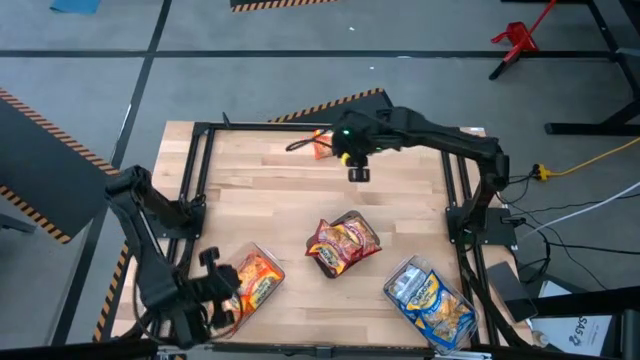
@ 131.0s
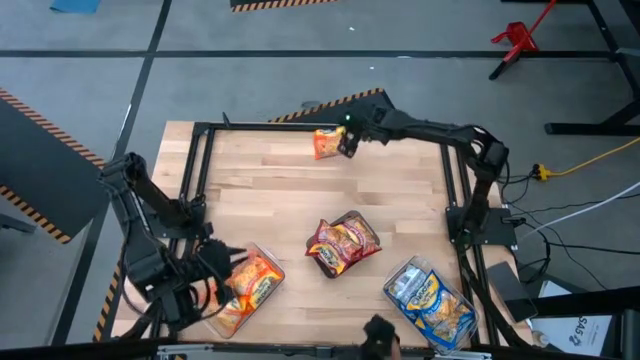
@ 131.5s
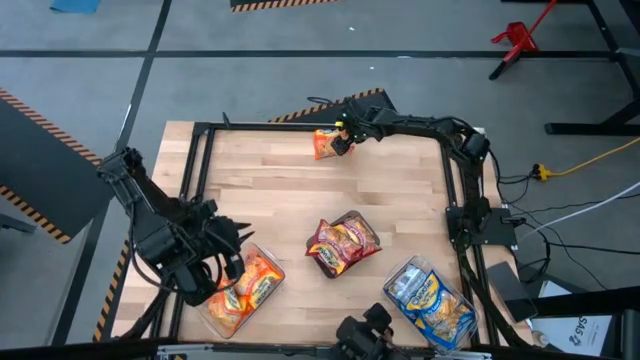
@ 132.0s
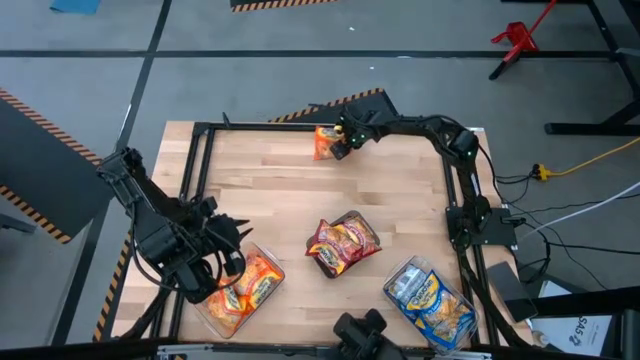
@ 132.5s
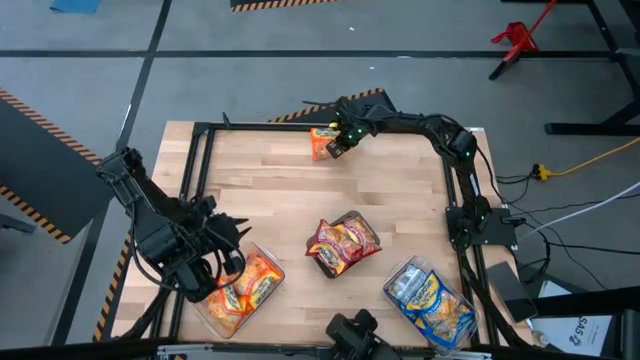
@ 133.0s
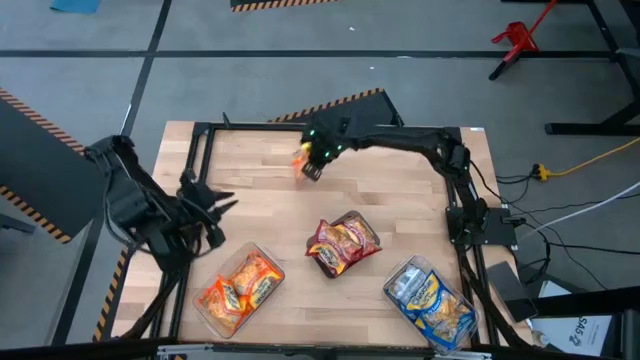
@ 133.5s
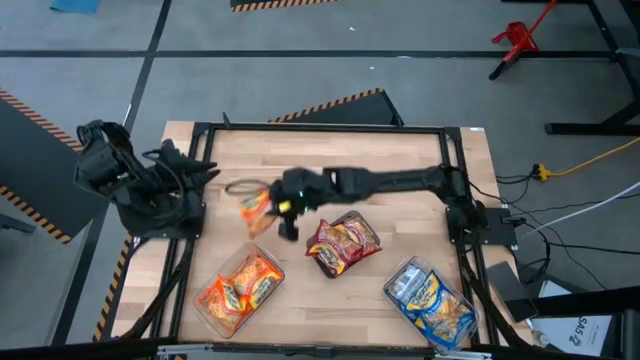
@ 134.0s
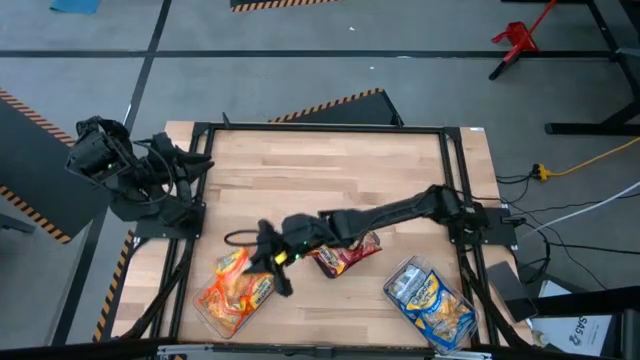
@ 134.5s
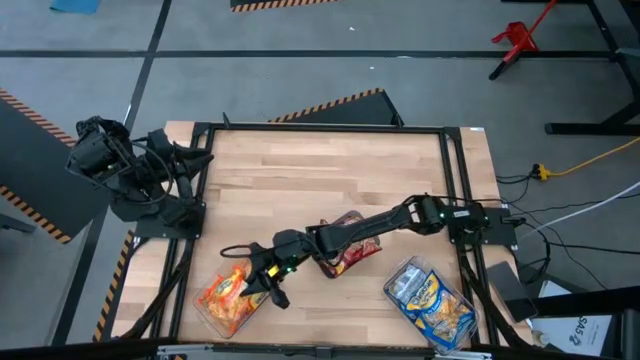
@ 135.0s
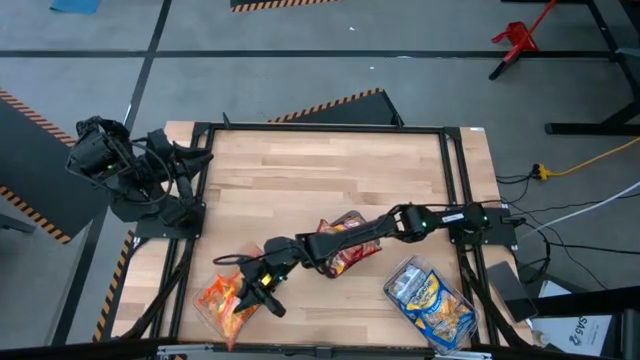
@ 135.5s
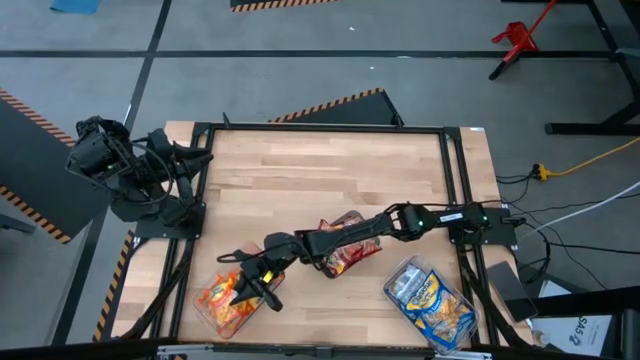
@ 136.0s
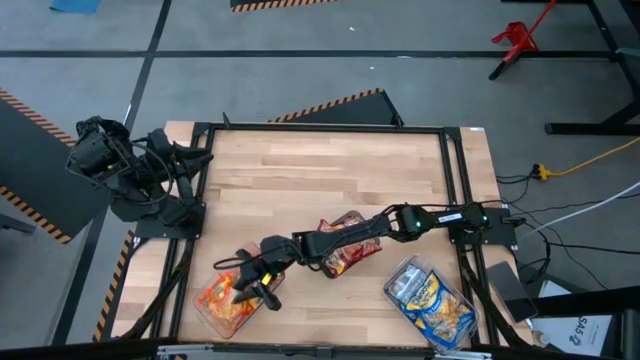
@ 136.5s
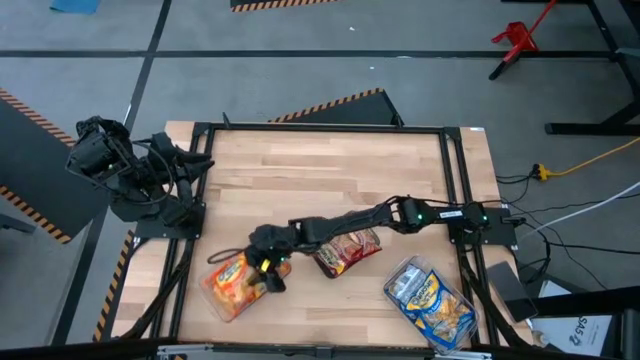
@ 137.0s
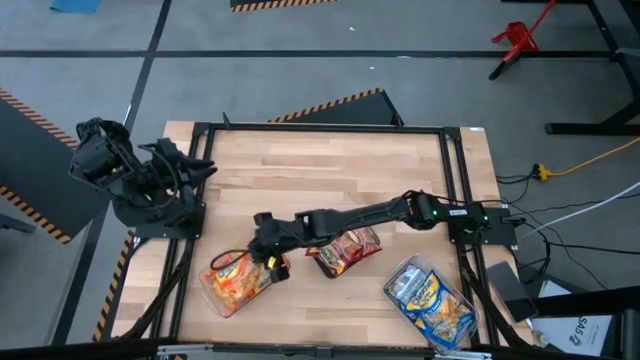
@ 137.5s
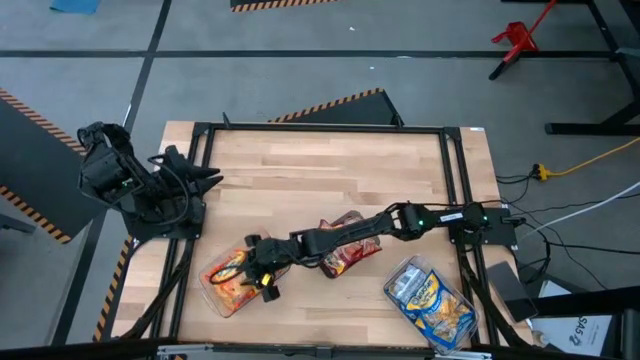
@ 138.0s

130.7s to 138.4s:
Task: Sort Maruchan noodles
Put the orange noodle pack into the left transparent bin

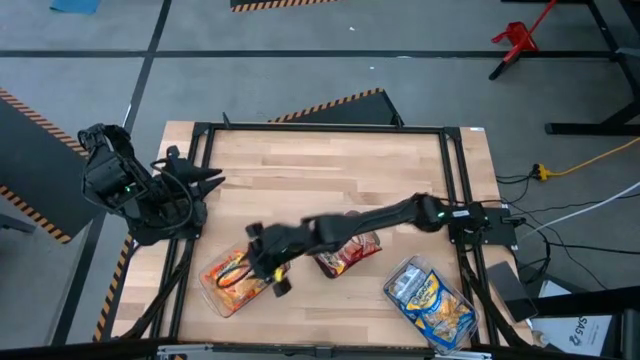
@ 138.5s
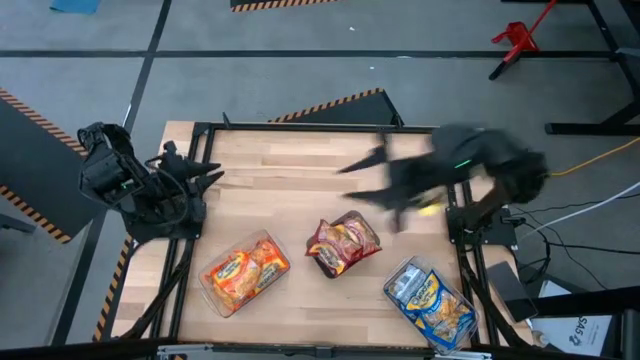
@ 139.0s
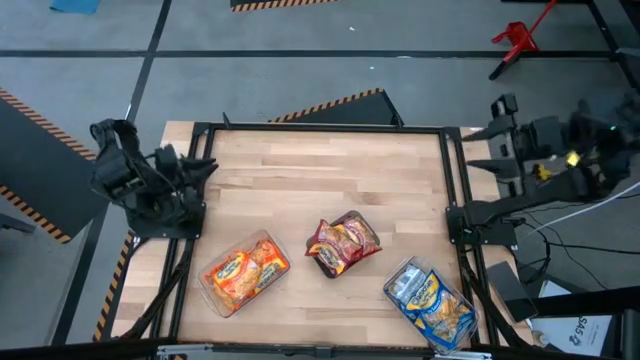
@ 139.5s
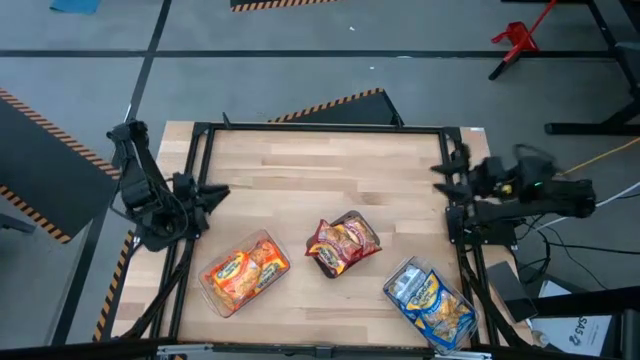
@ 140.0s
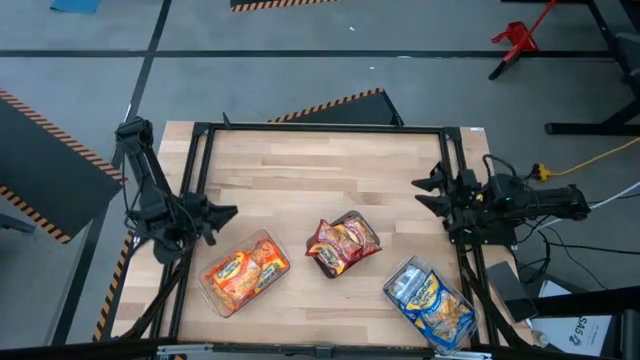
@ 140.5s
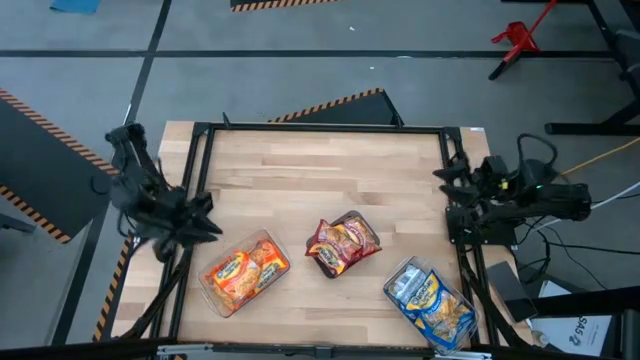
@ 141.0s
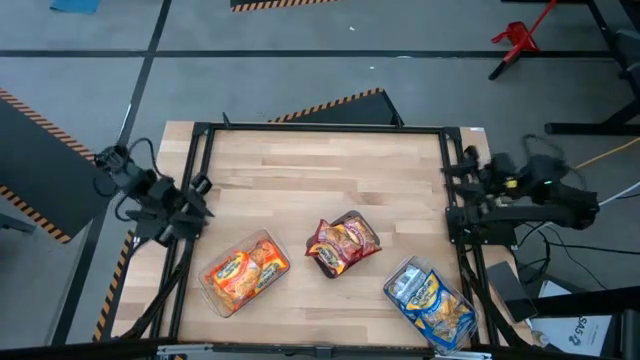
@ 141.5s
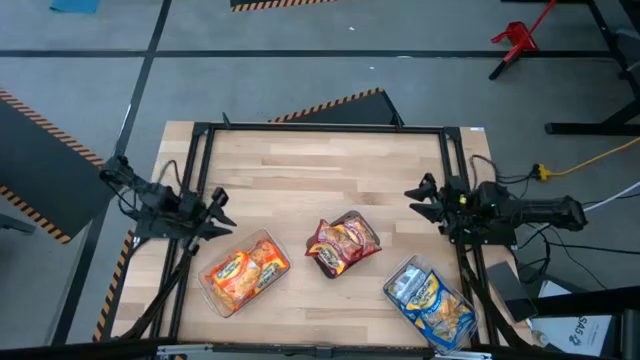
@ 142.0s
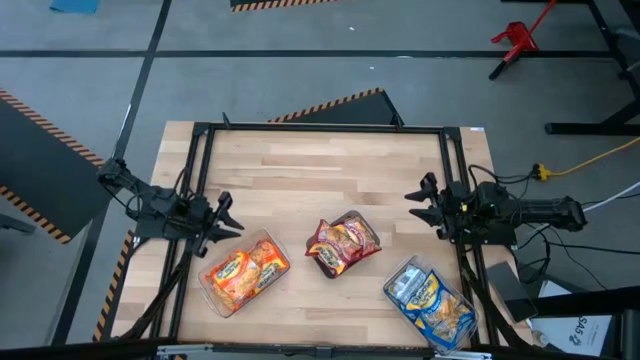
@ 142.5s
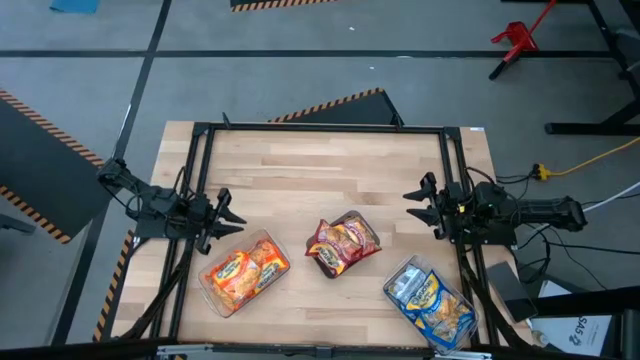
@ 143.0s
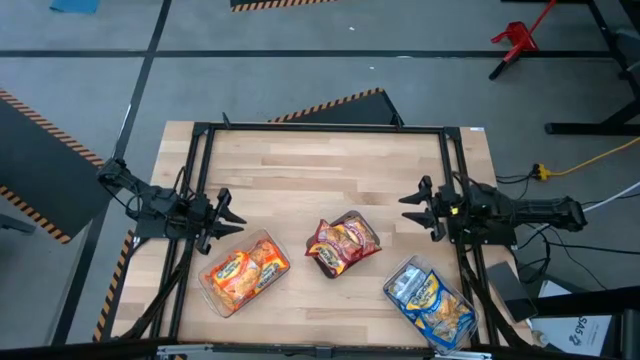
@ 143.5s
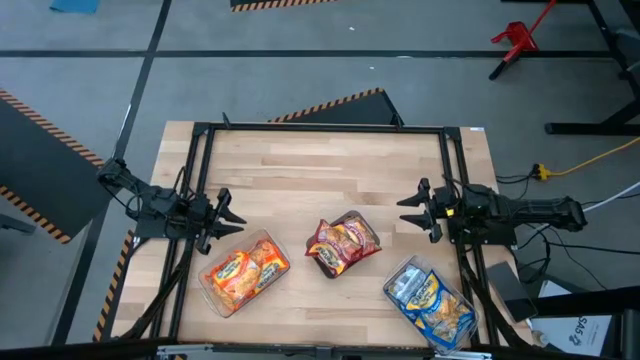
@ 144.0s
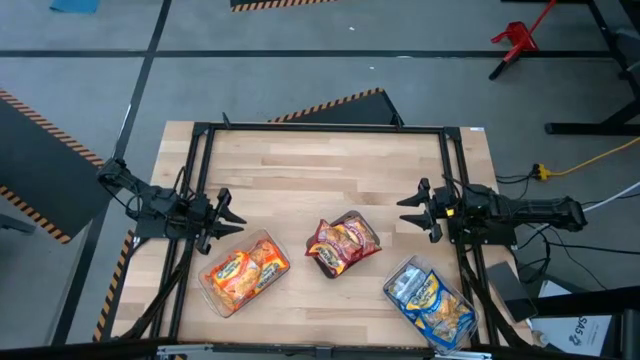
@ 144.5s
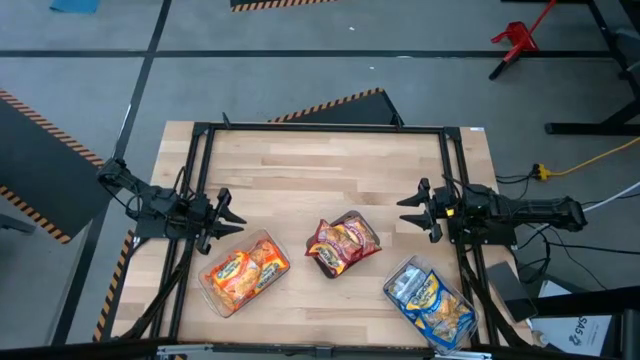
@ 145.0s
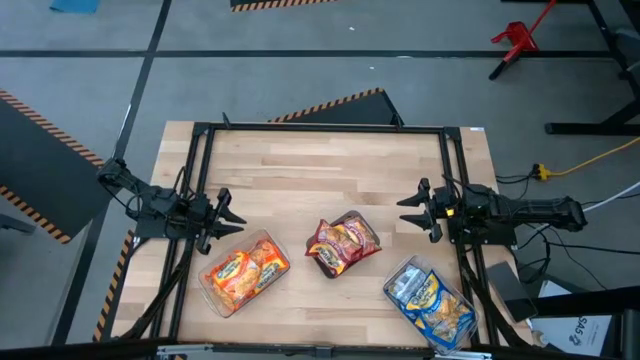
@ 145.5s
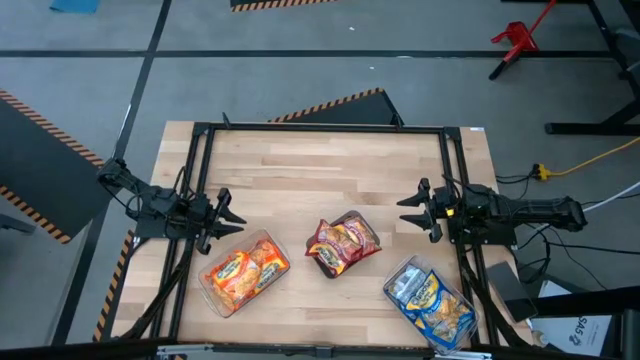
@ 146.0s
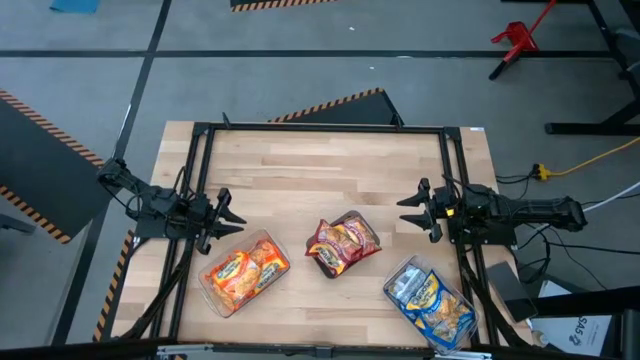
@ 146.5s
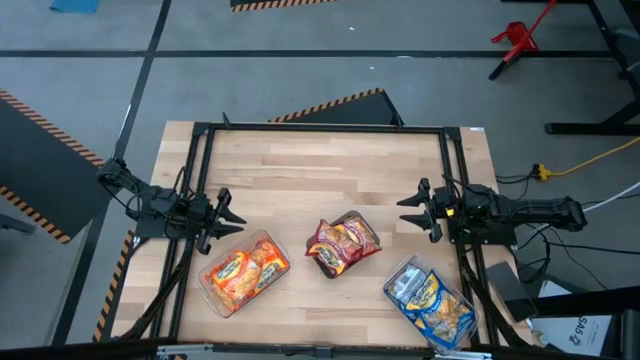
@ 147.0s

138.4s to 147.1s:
Return to Home Position

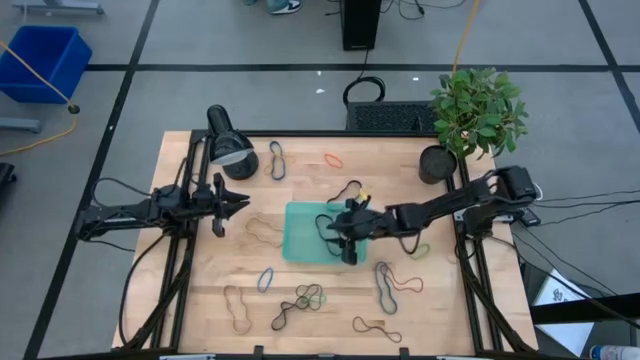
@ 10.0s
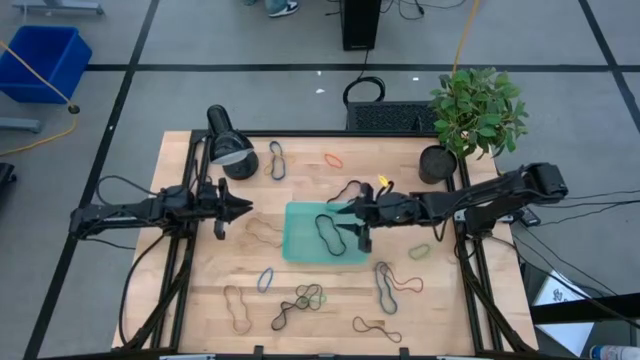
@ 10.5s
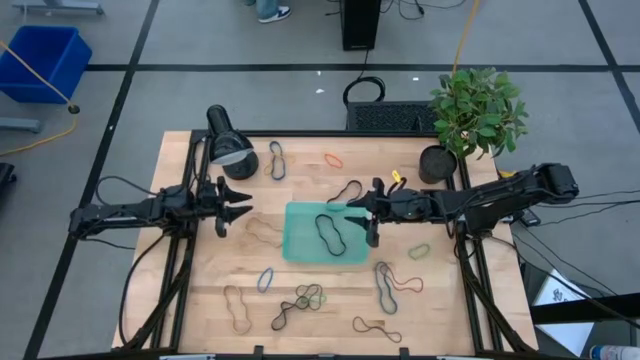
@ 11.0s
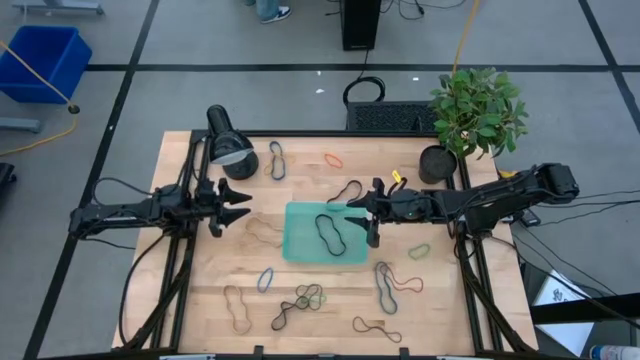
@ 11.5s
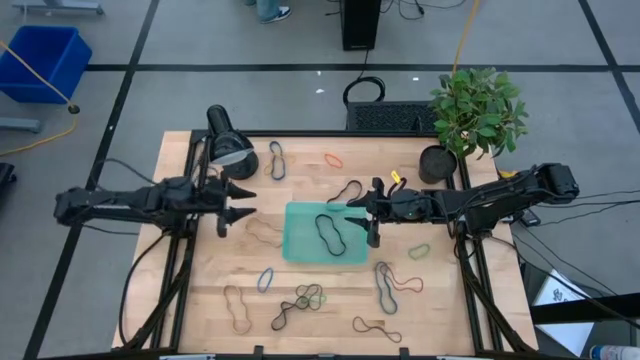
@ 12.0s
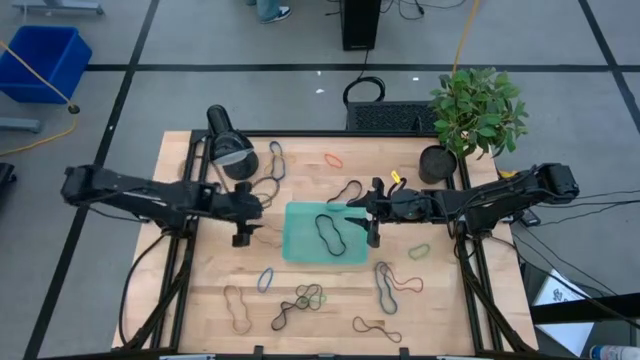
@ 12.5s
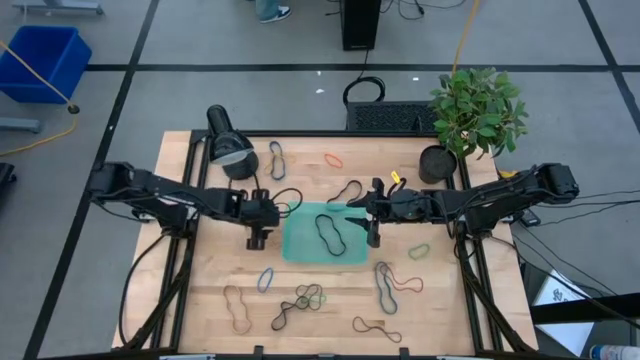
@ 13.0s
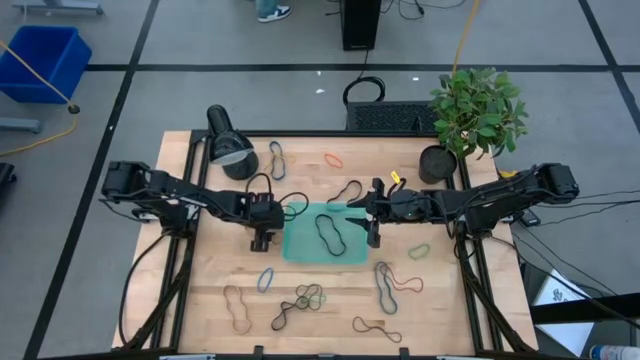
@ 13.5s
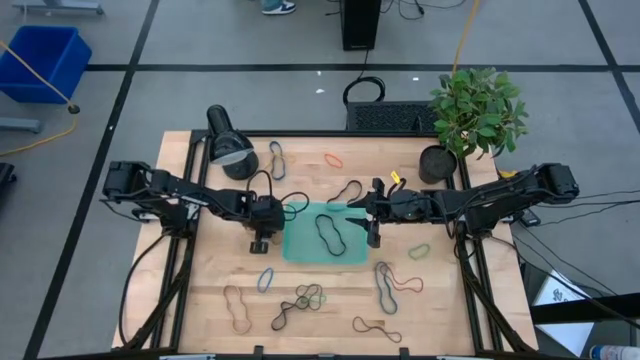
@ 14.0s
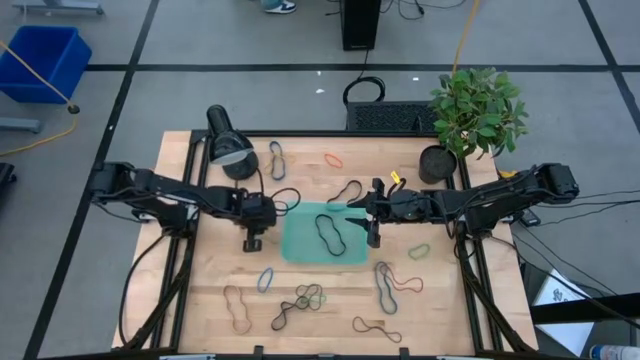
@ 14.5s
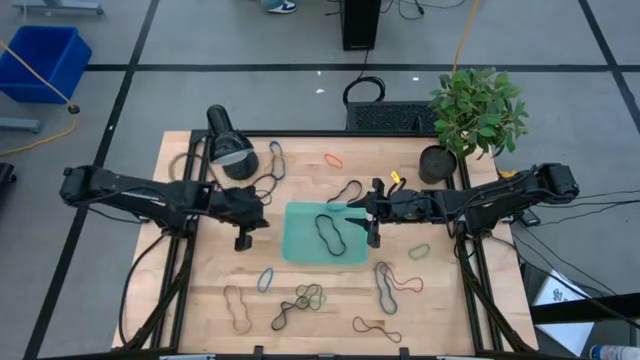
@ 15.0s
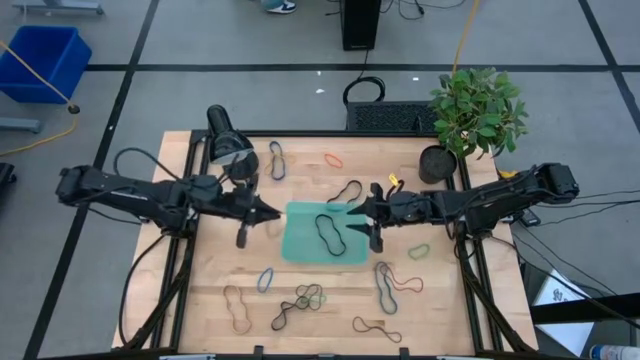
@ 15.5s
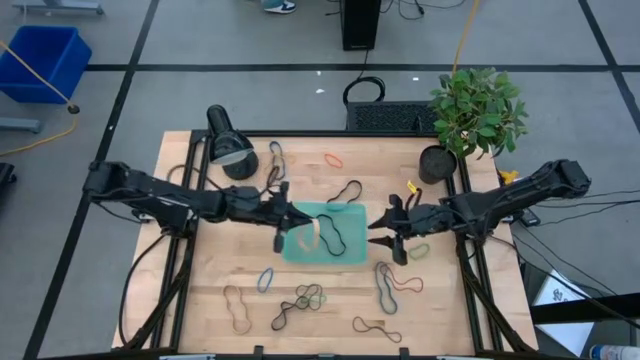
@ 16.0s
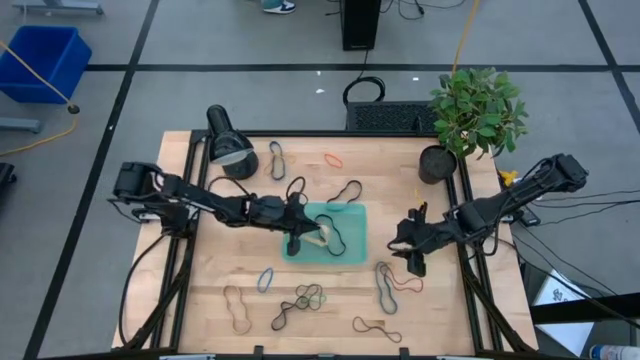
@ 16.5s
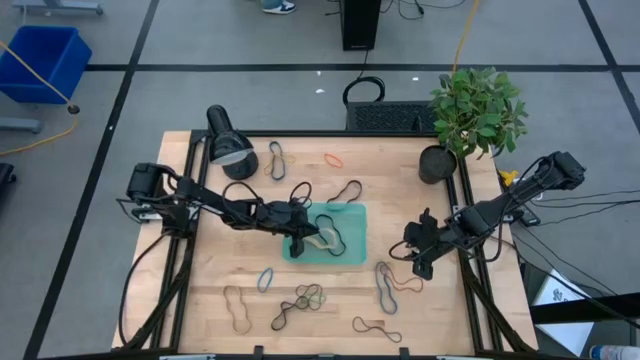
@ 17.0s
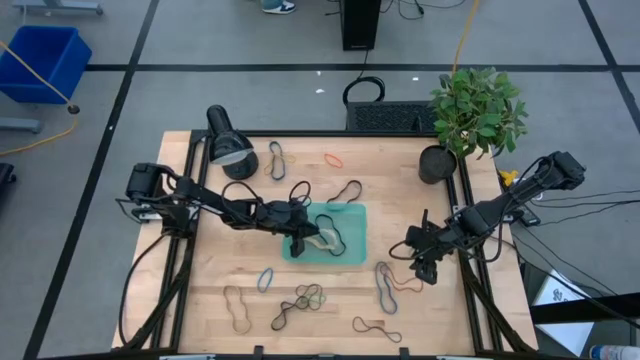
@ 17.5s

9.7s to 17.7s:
Task: Pick and place rubber bands into bin
Put the brown rubber band into the green bin
